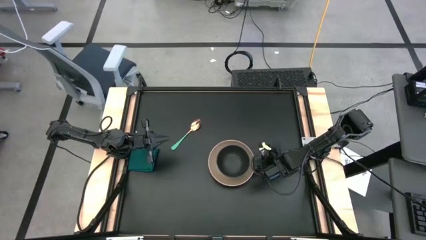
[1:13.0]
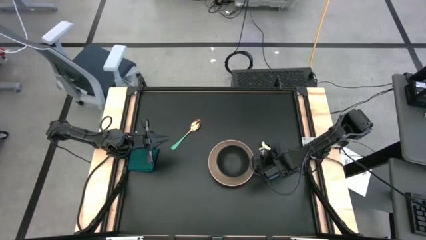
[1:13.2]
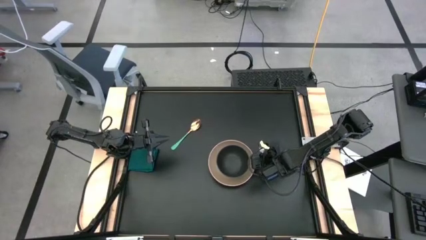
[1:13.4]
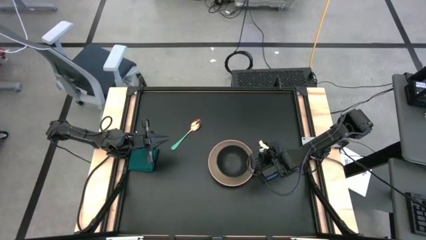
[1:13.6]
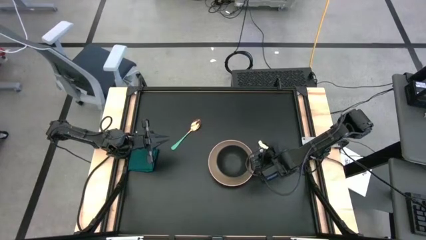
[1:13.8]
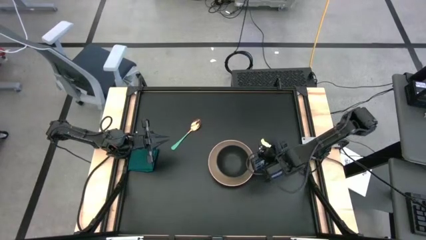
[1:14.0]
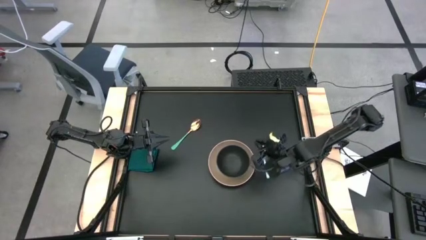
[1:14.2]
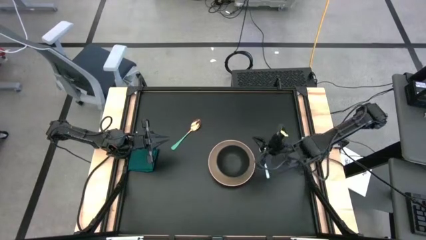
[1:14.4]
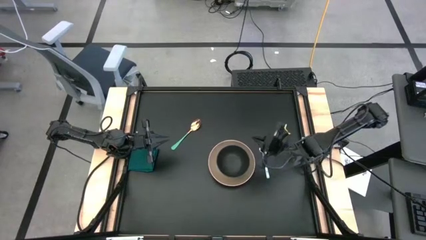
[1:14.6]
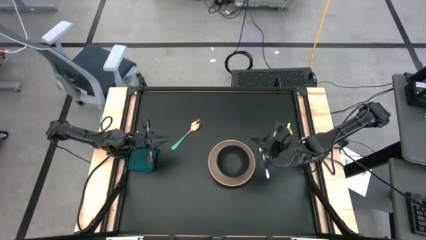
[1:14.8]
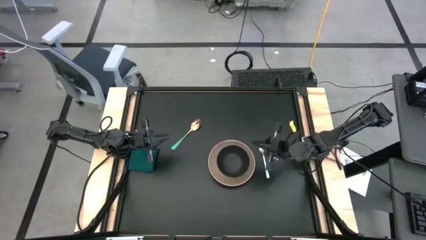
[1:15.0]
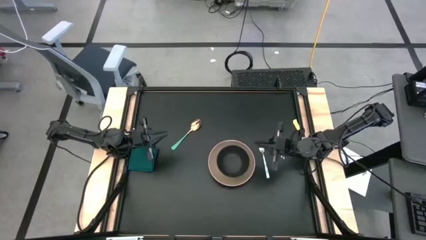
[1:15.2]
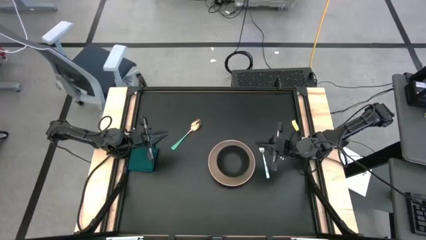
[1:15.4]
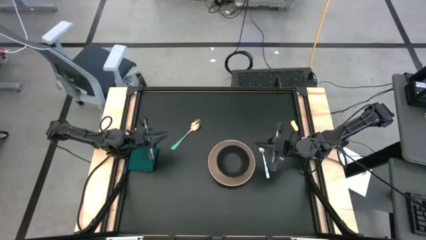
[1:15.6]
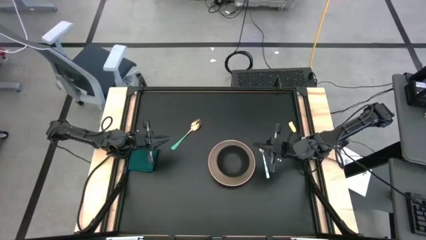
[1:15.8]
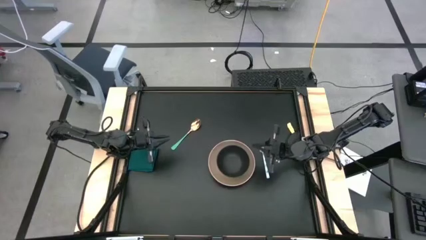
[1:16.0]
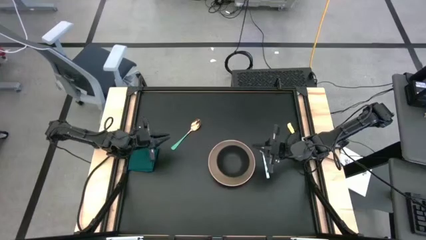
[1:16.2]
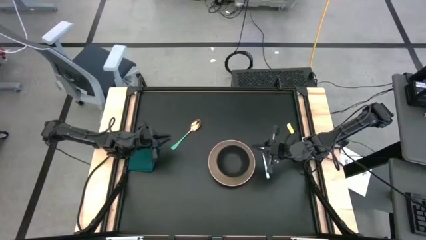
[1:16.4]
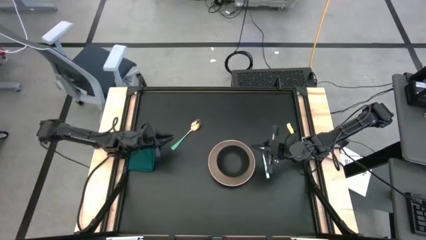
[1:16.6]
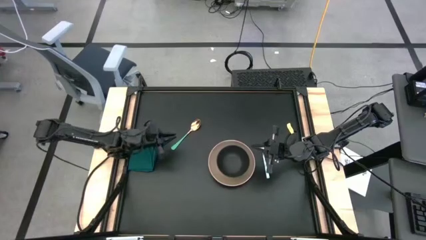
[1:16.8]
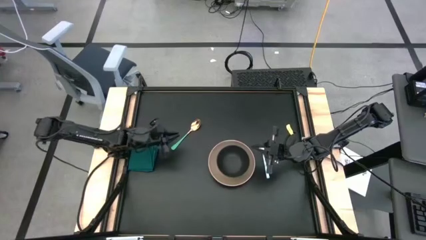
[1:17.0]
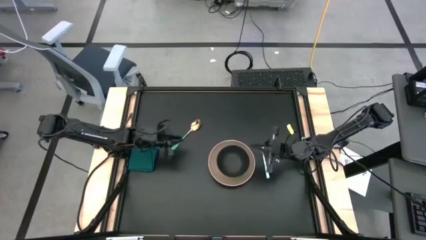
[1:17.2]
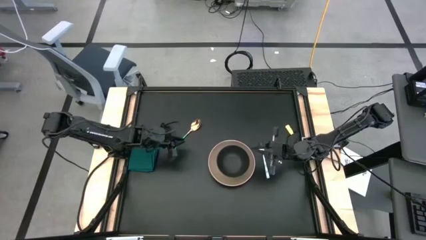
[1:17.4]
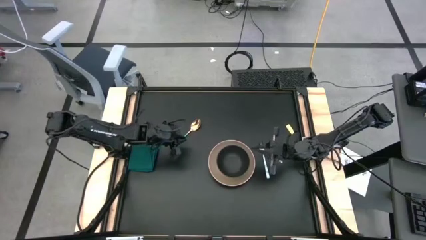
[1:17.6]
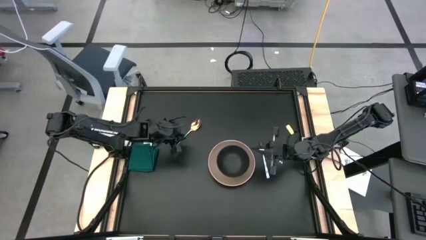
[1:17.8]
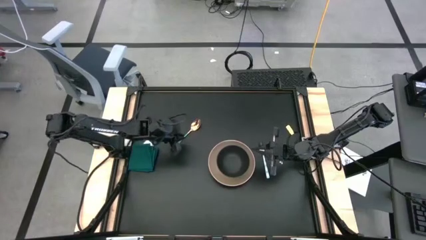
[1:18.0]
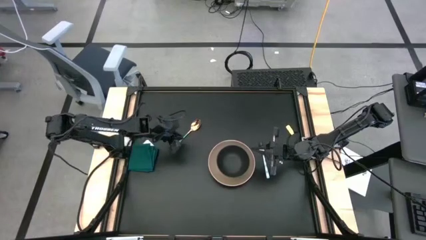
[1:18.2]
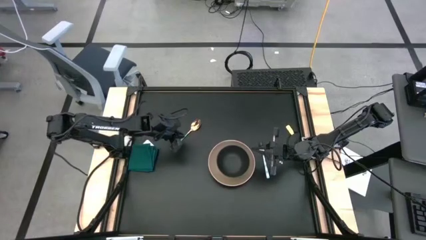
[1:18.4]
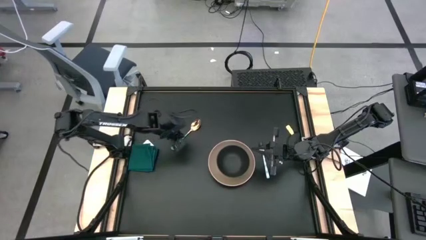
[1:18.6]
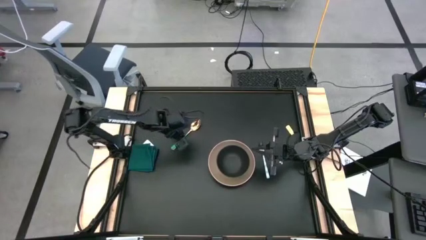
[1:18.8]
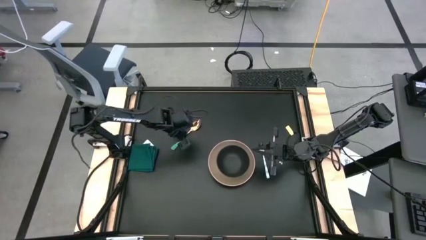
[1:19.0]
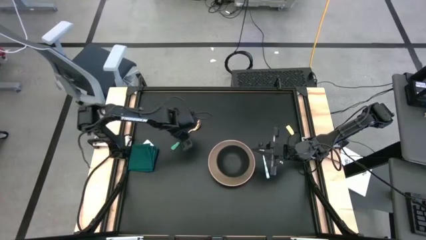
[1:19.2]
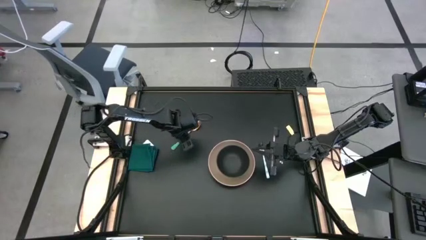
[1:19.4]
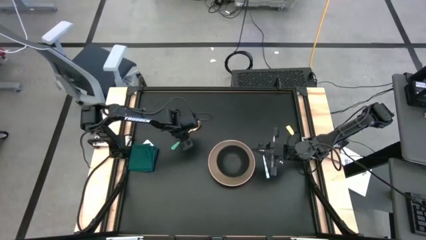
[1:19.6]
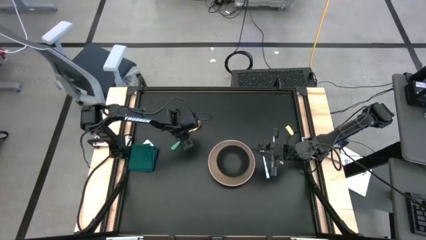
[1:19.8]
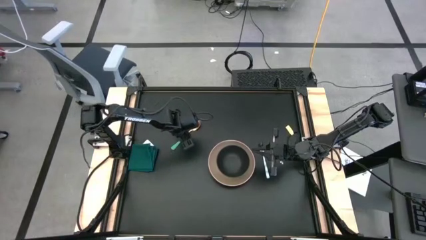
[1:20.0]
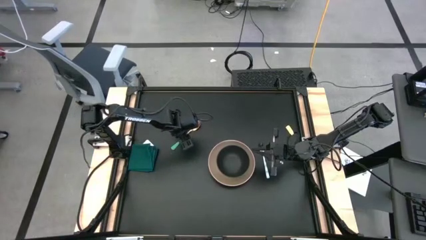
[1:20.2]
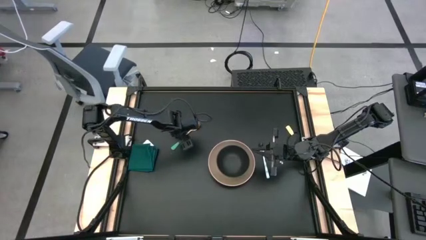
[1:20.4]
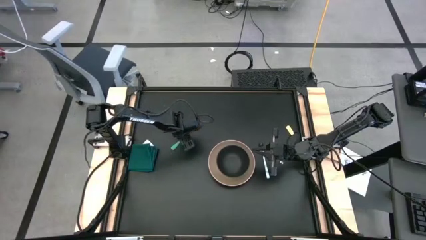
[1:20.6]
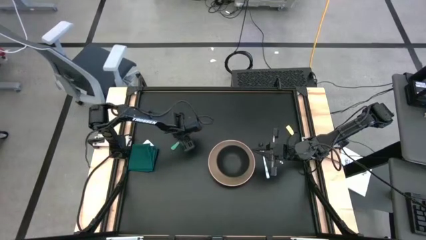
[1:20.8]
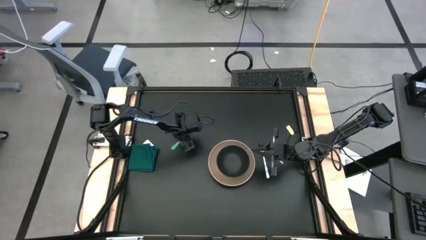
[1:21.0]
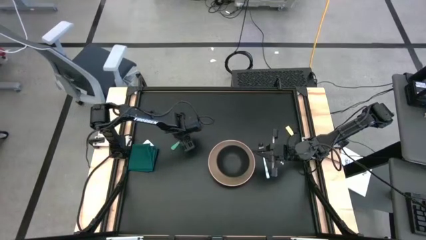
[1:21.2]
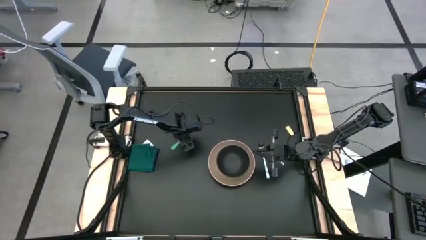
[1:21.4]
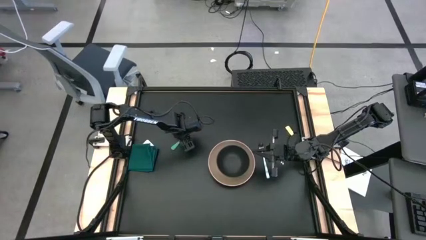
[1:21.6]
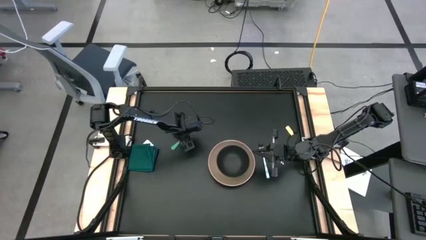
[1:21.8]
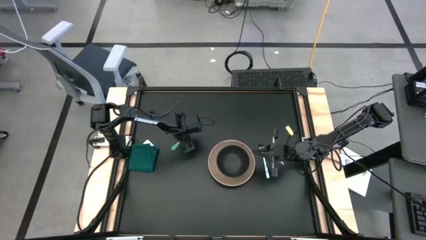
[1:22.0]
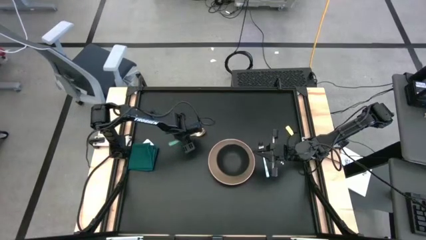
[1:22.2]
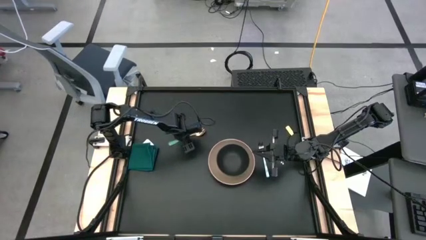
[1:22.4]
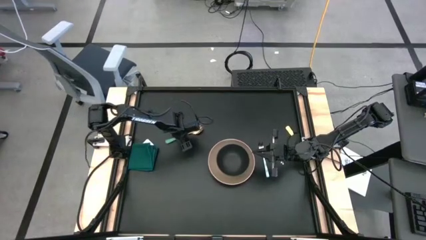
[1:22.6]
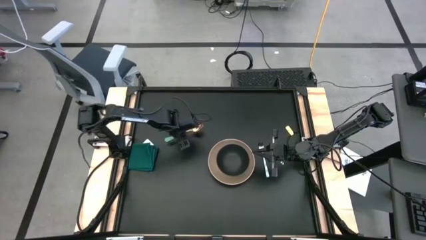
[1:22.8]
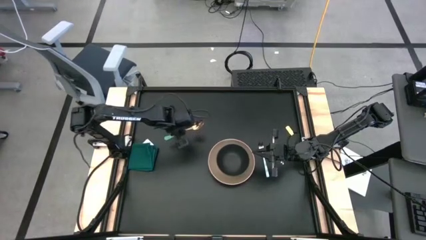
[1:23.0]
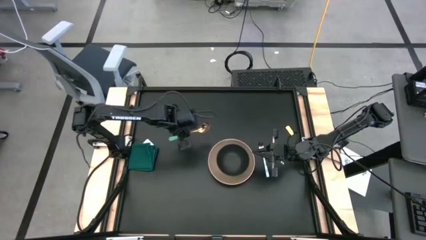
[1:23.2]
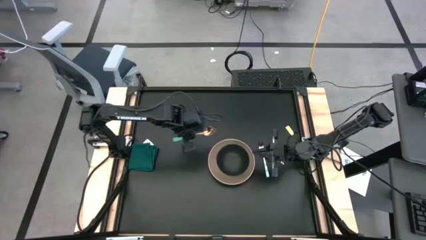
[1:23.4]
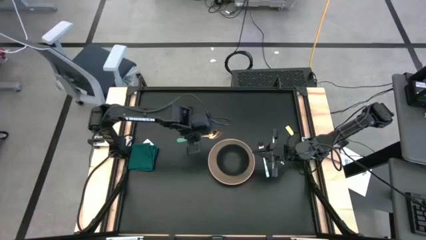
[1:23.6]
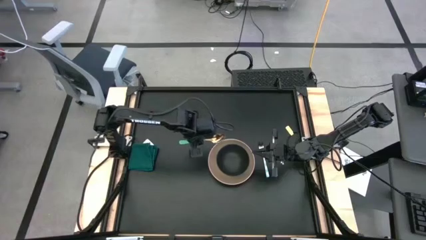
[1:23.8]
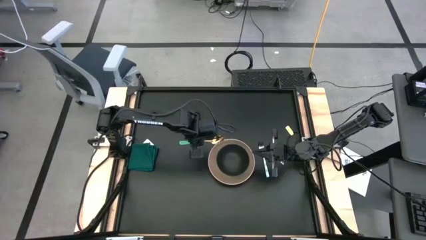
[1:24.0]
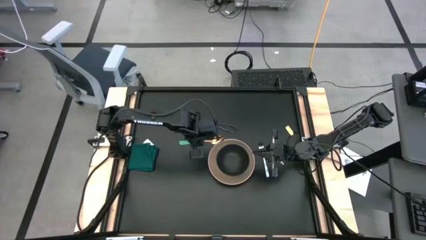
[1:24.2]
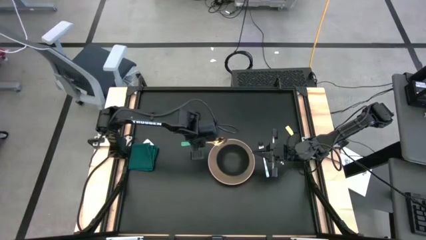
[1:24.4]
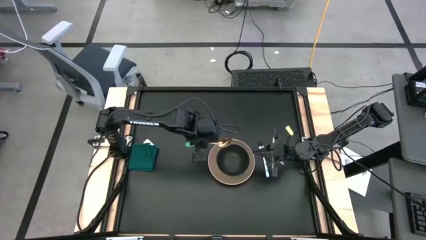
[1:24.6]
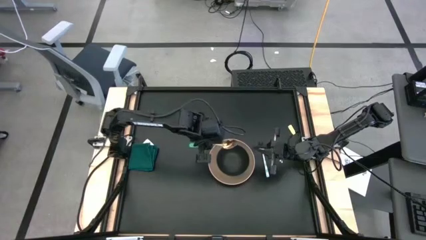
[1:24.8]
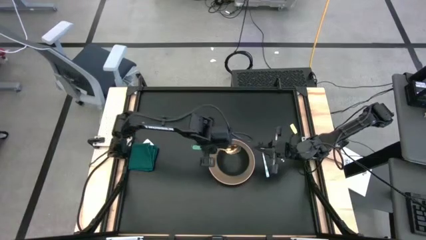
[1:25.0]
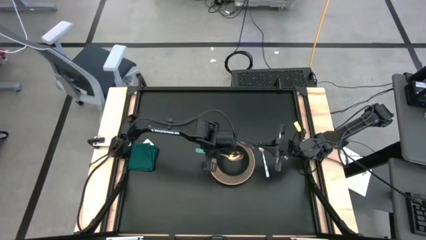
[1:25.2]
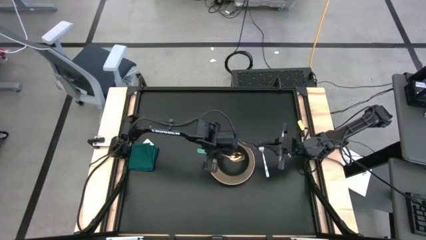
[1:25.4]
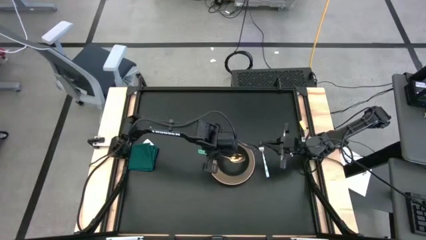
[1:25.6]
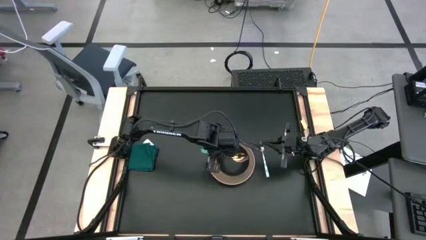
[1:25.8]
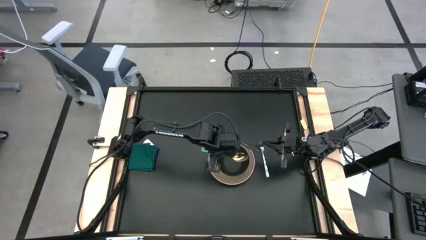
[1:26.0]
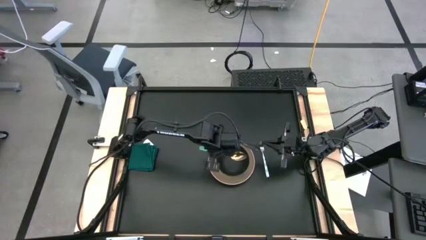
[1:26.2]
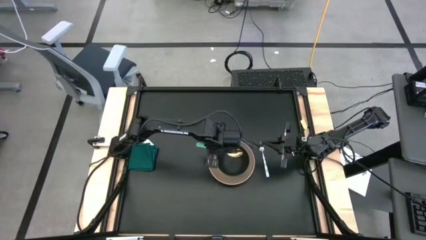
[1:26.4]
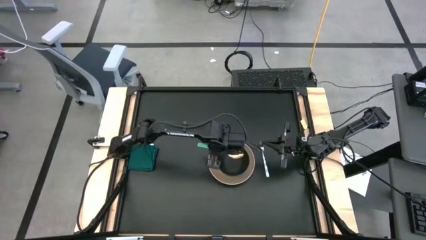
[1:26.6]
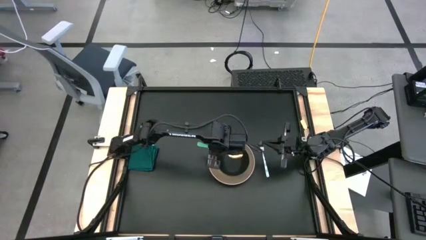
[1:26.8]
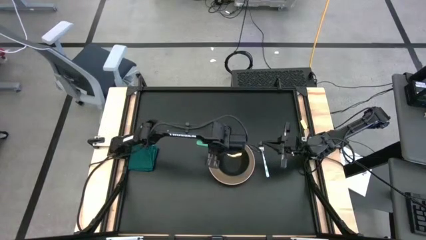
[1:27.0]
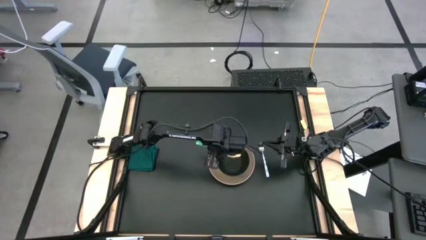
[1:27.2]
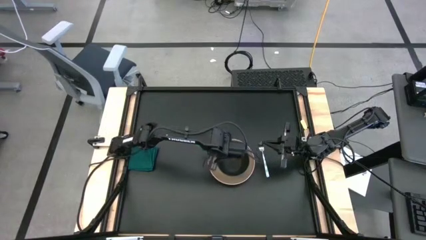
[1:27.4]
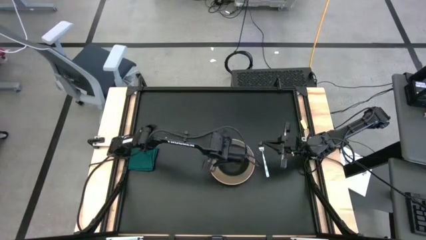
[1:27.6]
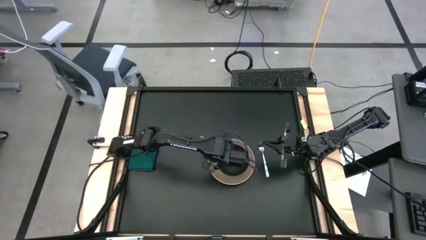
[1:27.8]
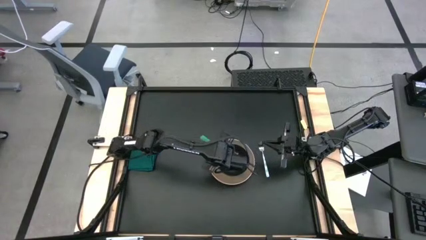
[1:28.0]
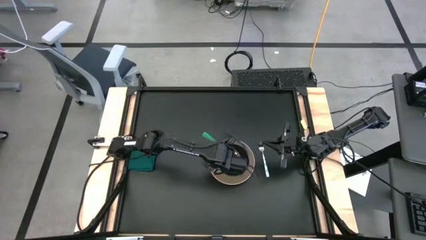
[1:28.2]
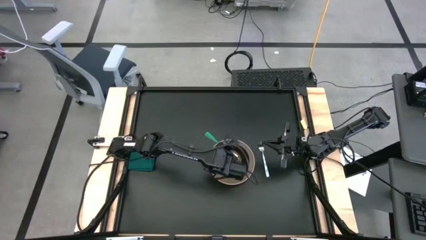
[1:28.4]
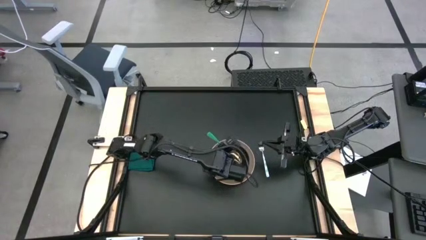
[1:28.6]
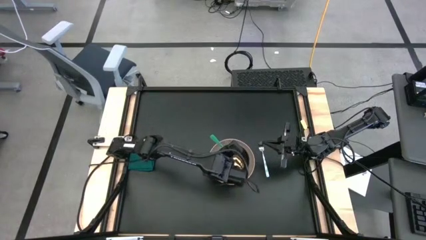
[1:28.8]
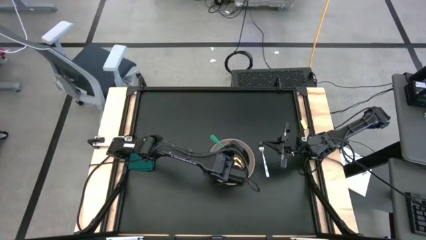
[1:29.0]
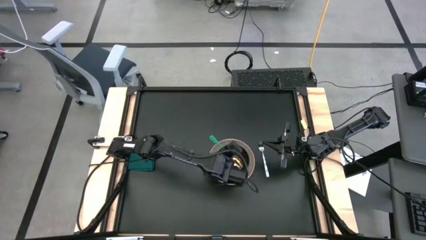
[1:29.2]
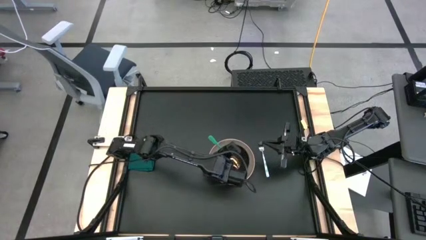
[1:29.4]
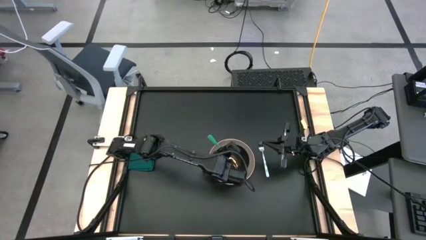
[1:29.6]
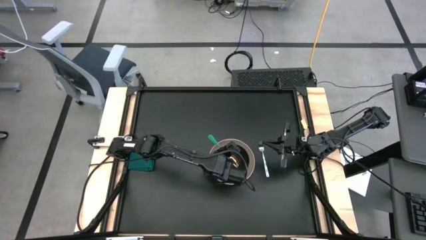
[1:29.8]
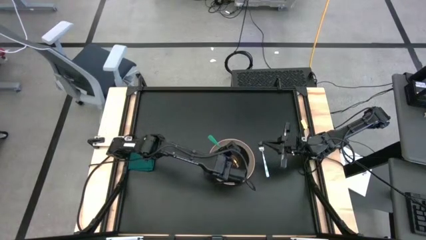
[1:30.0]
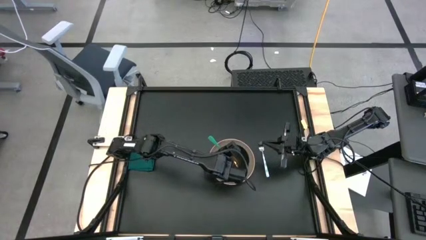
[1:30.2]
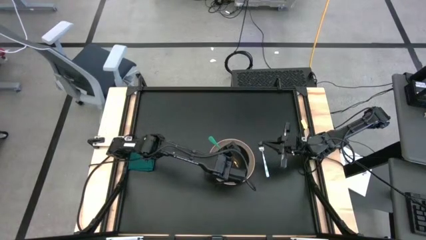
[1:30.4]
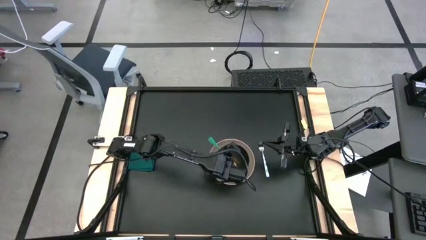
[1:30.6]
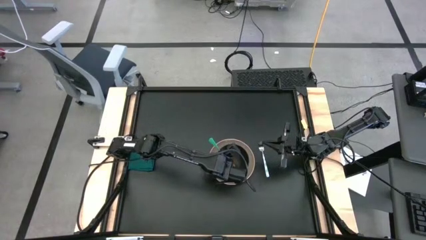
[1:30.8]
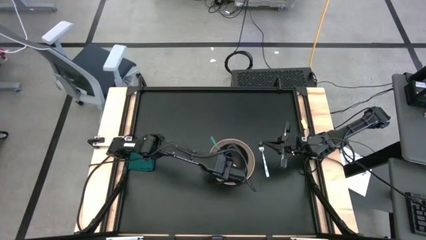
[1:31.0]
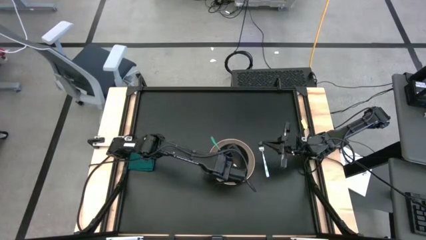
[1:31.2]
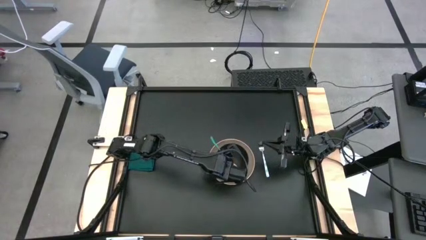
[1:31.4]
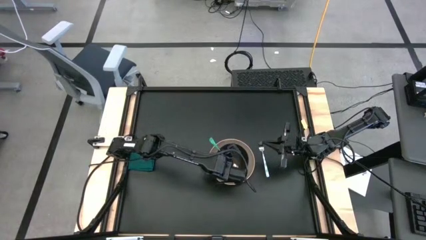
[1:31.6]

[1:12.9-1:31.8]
Task: Set table place
Put the blue spoon into the black bowl
